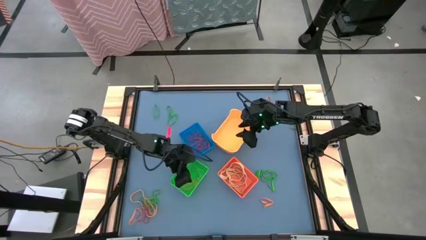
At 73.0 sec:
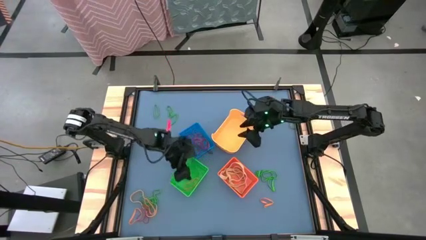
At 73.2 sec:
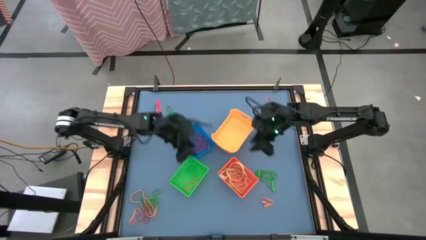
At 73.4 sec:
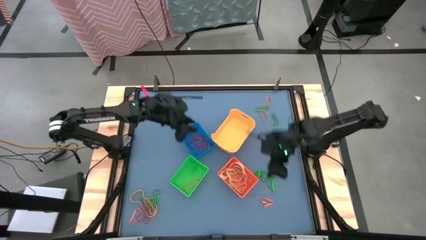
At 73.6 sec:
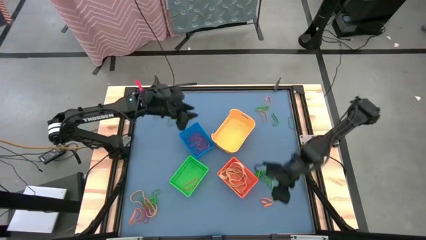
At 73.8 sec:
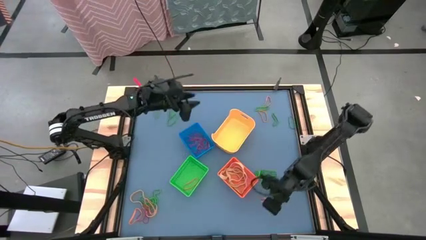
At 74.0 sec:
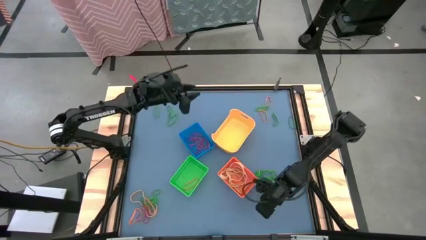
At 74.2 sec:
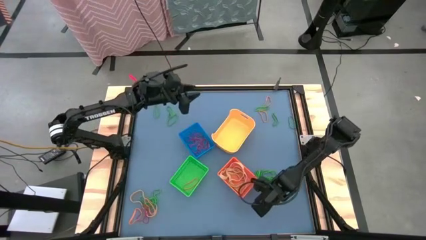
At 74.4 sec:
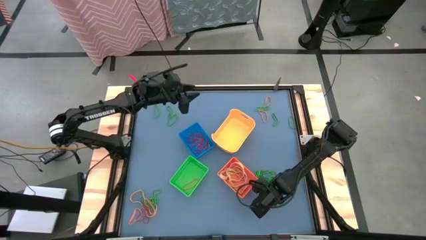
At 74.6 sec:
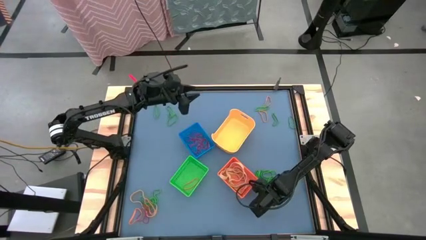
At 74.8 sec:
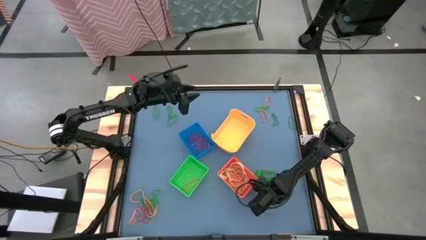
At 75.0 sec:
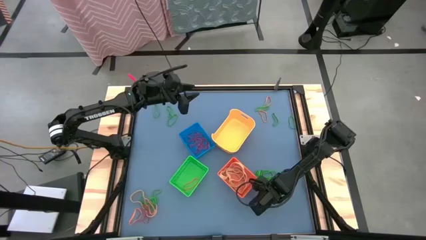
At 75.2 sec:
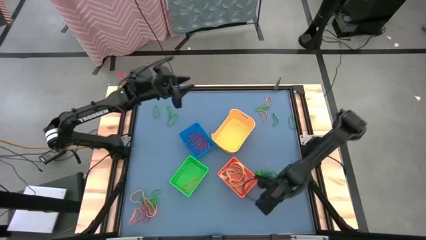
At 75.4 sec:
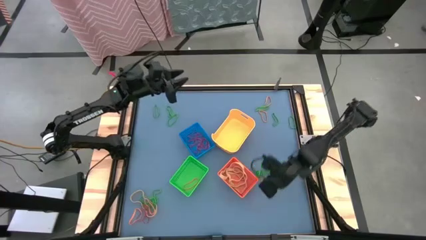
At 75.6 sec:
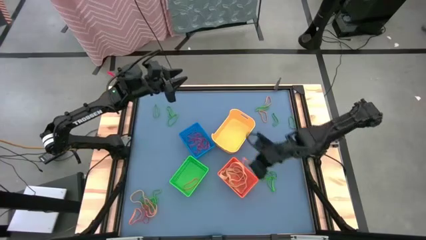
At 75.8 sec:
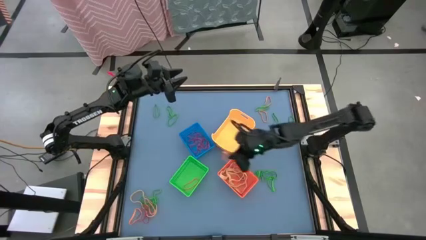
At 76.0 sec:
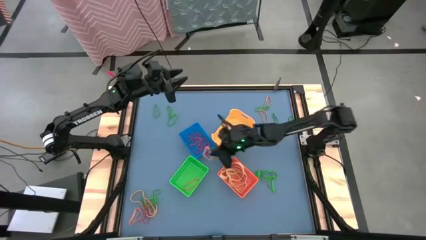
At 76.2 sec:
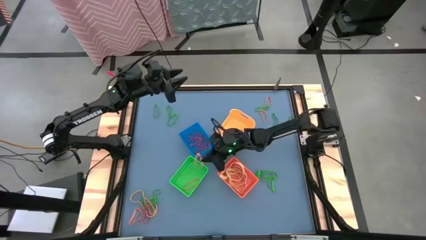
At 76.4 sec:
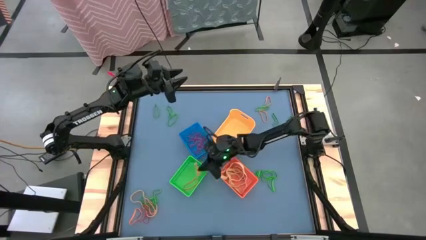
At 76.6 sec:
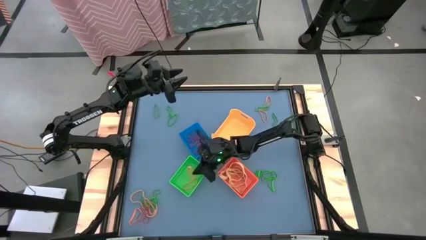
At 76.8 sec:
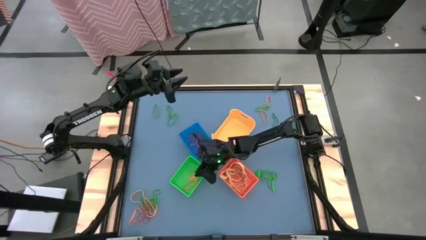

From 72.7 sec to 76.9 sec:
Task: Sort rubber bands into baskets
Put the orange rubber band into the green bin

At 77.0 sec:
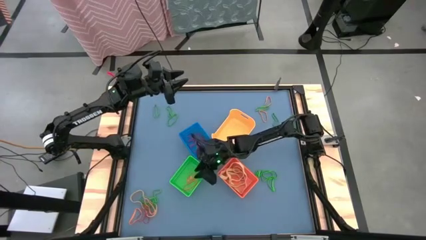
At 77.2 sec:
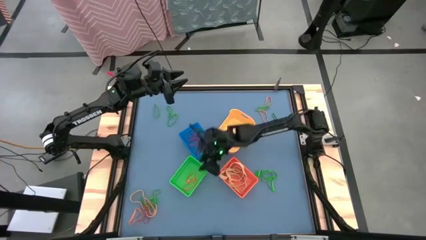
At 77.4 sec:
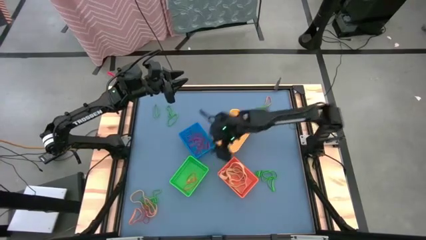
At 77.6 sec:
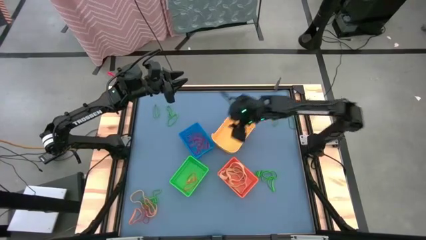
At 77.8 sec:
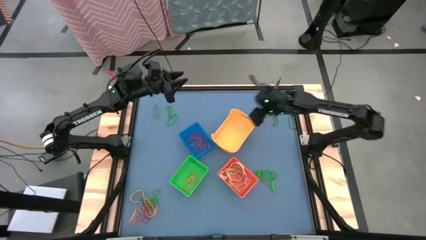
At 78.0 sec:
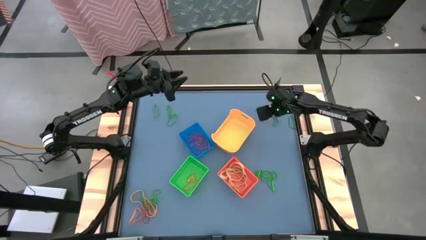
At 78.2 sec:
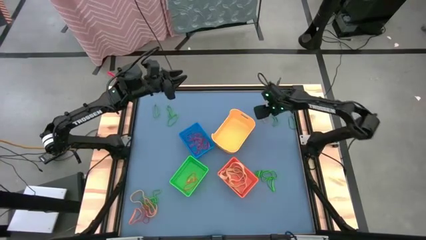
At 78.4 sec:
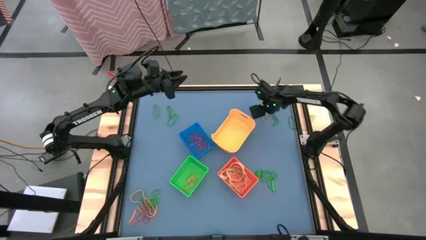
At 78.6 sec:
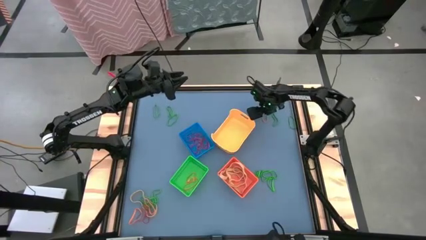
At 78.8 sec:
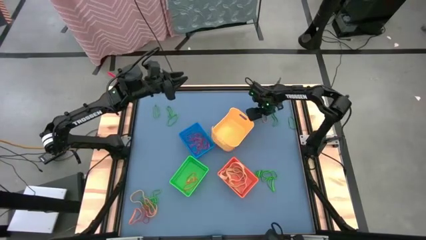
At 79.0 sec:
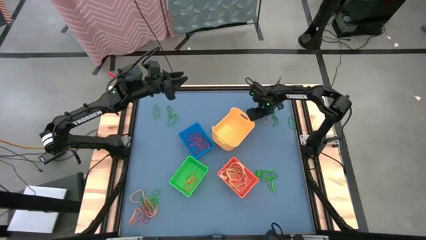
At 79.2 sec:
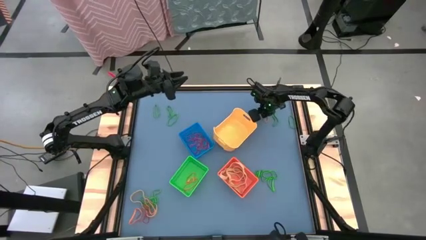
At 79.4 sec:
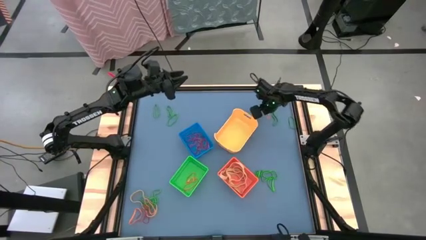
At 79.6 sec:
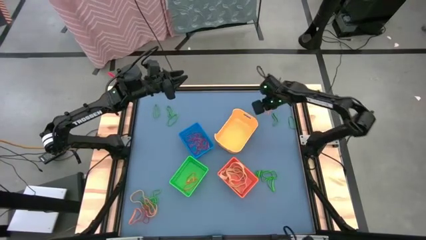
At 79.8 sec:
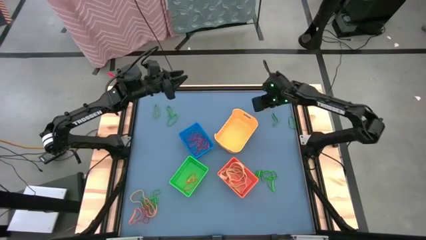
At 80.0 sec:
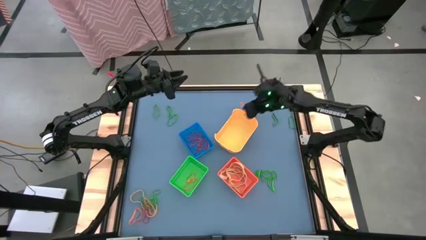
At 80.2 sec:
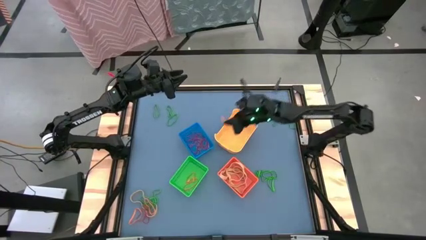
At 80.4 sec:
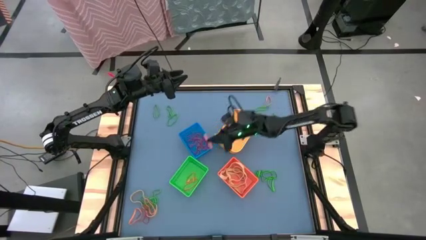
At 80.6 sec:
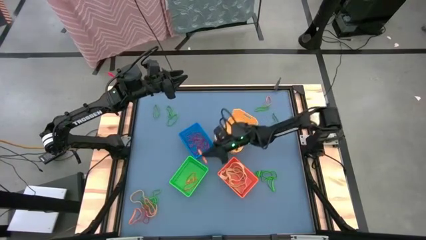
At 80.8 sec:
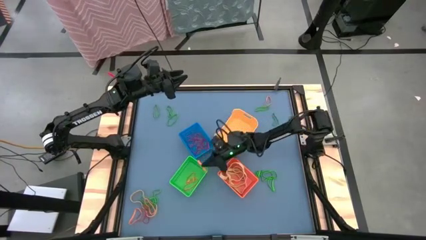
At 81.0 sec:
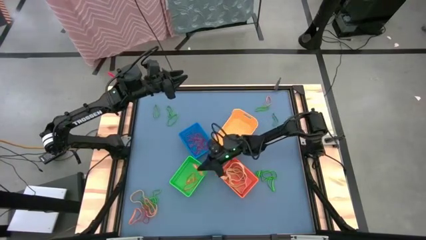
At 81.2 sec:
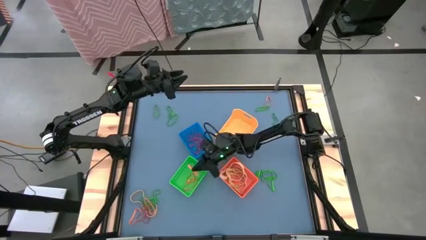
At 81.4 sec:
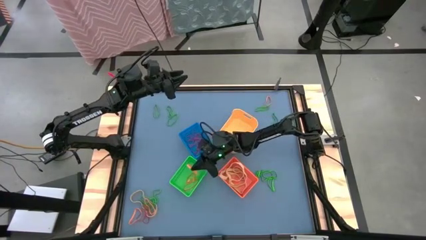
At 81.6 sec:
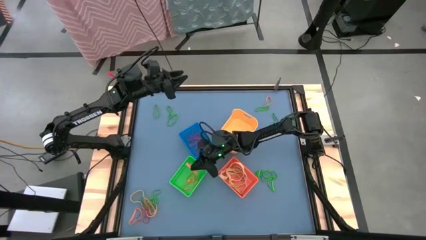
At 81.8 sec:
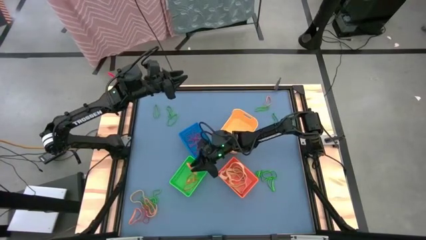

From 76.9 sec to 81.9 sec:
Put the orange rubber band into the green bin

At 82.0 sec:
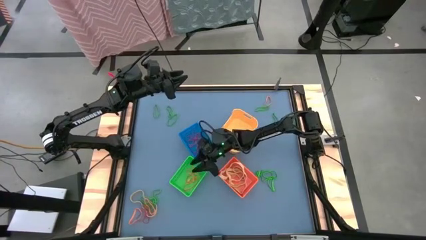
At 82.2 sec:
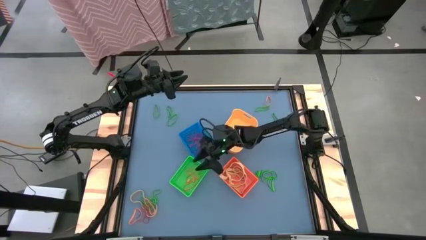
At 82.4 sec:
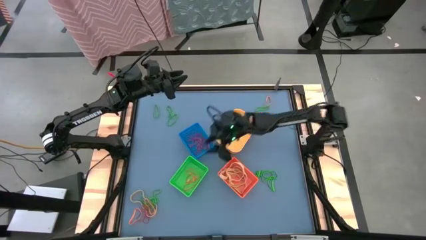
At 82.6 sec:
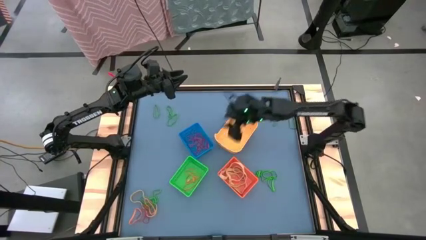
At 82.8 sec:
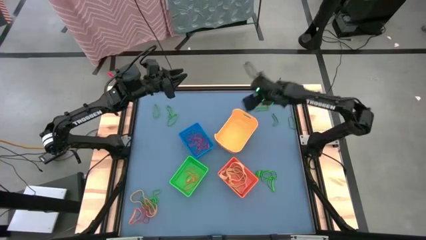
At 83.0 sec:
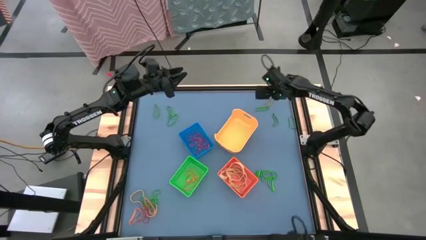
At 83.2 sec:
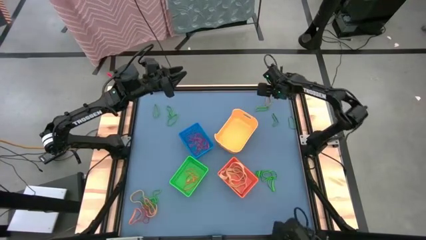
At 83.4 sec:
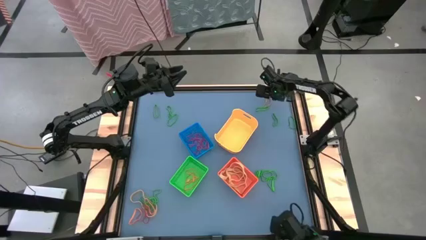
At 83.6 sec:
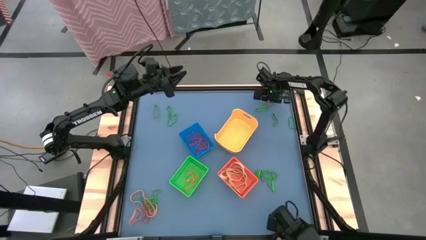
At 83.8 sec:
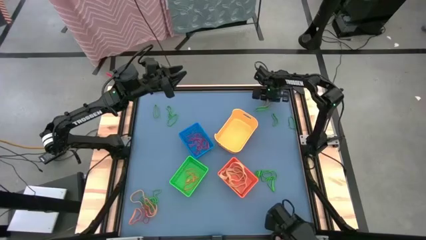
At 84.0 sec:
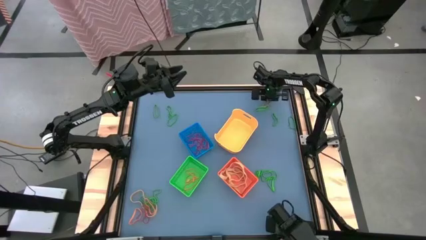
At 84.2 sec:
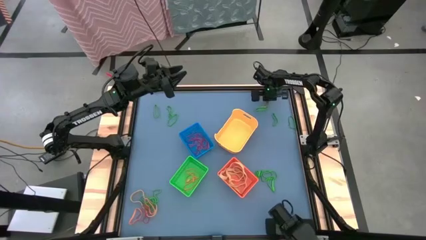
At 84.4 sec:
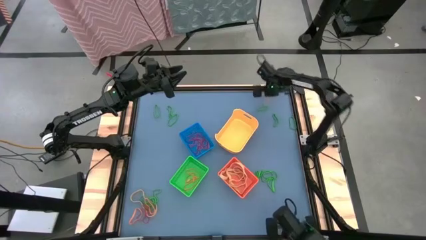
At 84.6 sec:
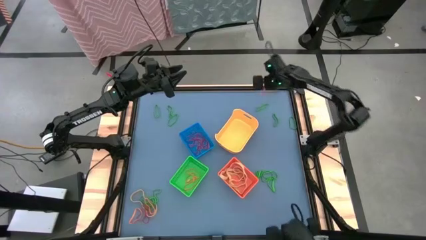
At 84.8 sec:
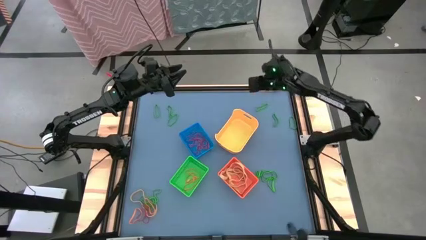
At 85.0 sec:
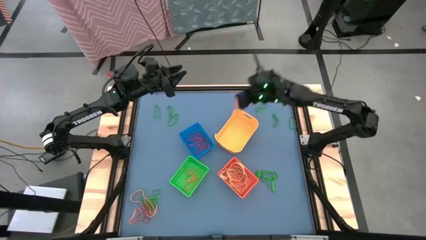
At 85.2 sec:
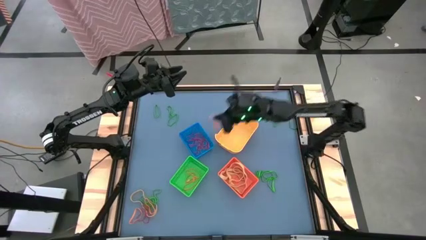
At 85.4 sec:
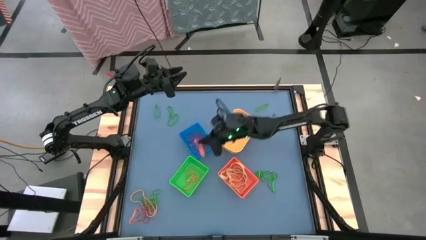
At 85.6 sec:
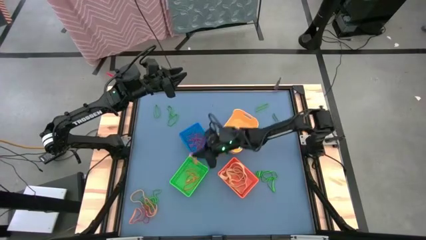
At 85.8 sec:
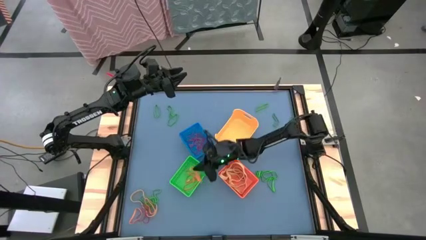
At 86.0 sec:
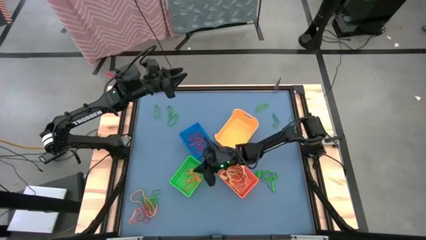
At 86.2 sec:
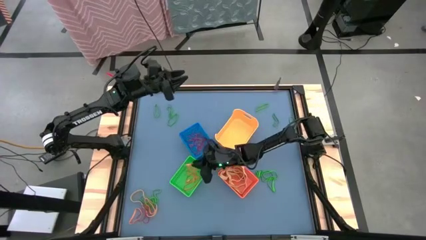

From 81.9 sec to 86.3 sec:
Put the orange rubber band into the green bin

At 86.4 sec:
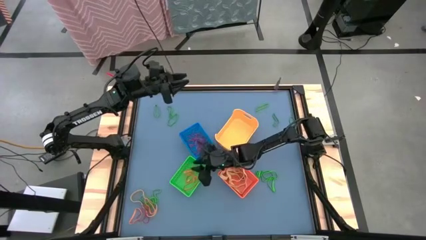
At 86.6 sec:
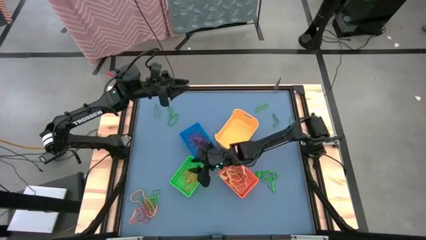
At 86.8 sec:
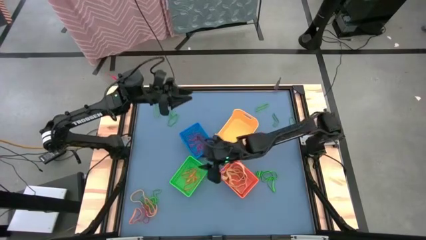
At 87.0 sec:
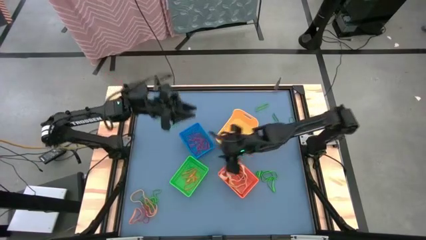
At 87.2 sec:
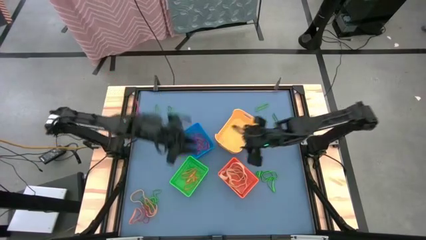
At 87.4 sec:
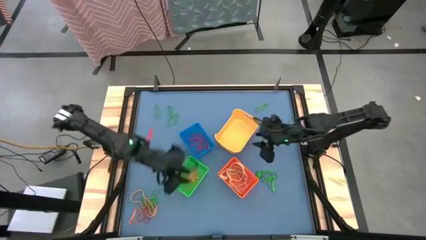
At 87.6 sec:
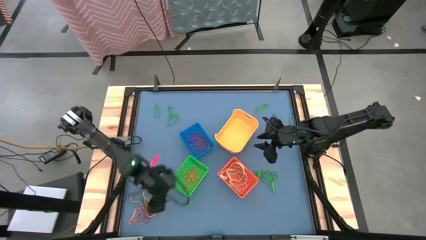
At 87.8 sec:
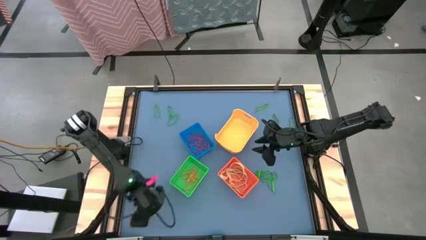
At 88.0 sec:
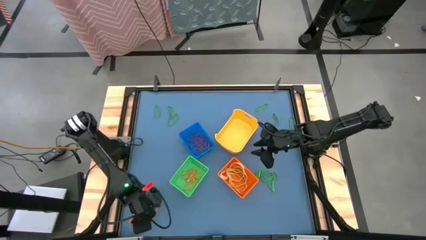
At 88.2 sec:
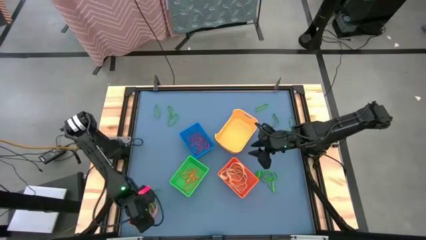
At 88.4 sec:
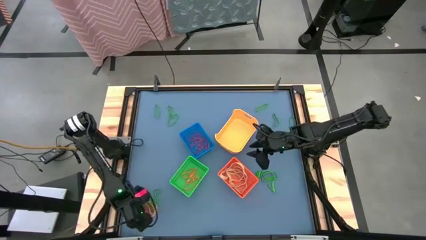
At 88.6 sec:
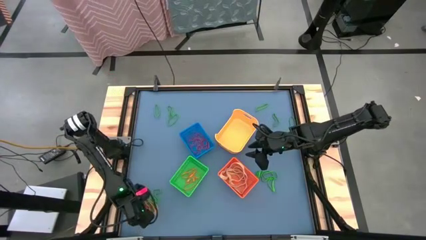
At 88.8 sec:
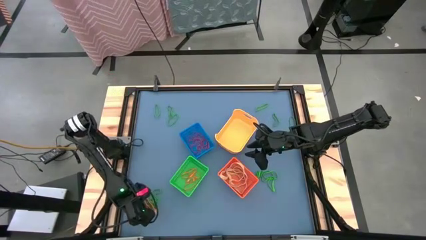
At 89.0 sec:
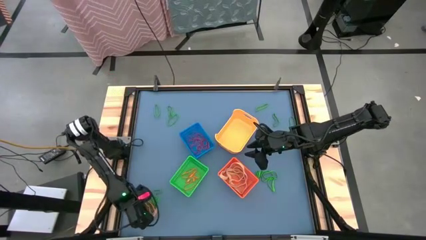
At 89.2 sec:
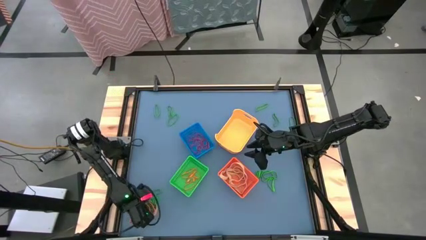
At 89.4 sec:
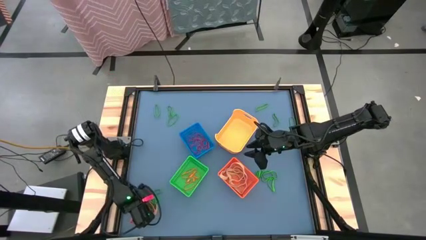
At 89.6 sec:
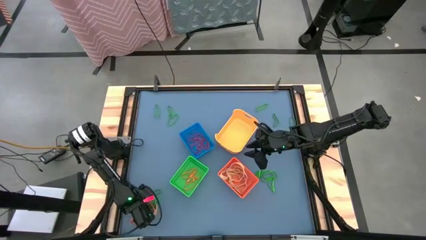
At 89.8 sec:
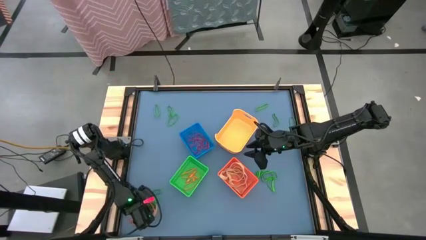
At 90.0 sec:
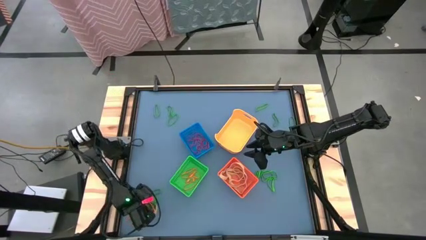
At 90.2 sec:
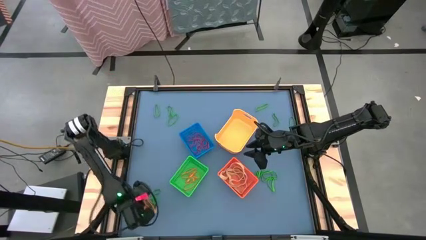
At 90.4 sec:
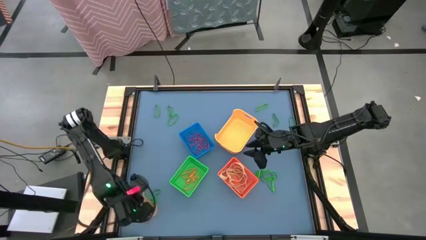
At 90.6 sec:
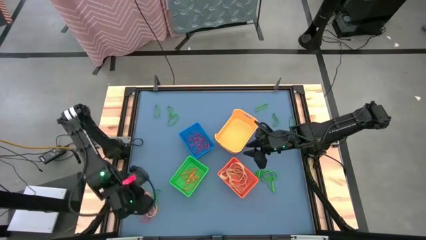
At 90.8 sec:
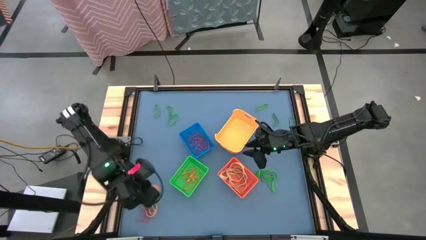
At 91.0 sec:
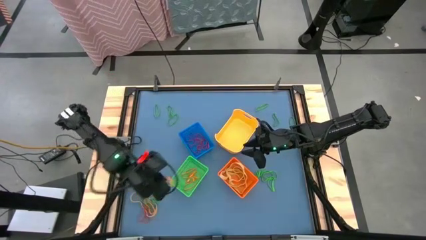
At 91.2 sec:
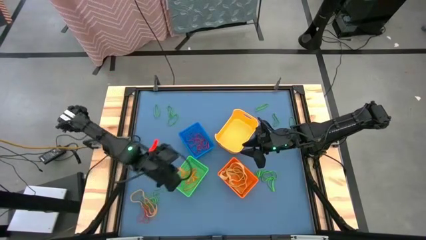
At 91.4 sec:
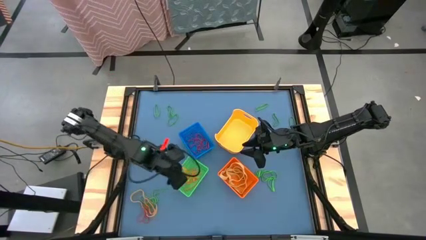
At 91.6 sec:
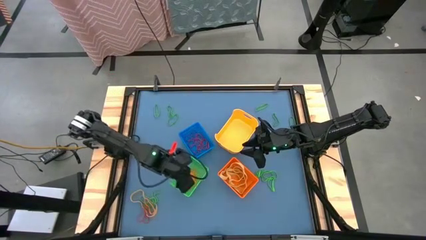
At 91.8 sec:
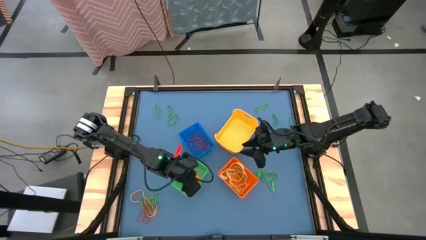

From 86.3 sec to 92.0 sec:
Put the orange rubber band into the green bin
